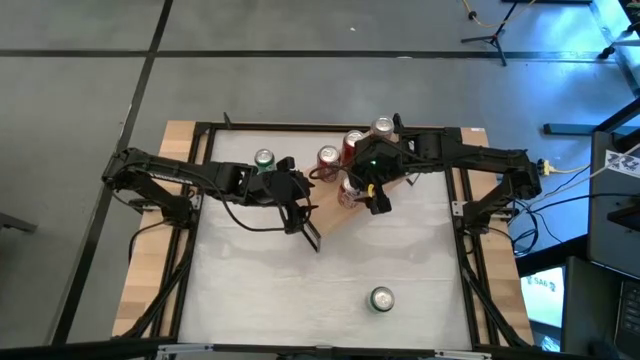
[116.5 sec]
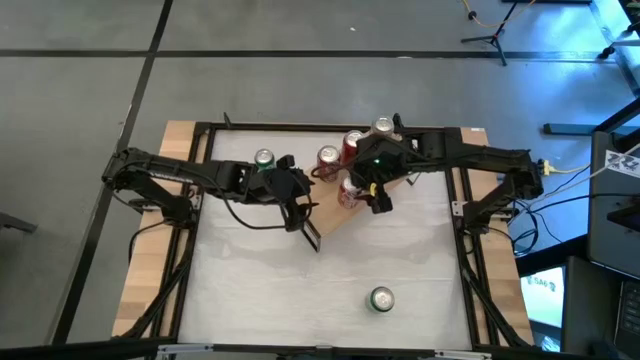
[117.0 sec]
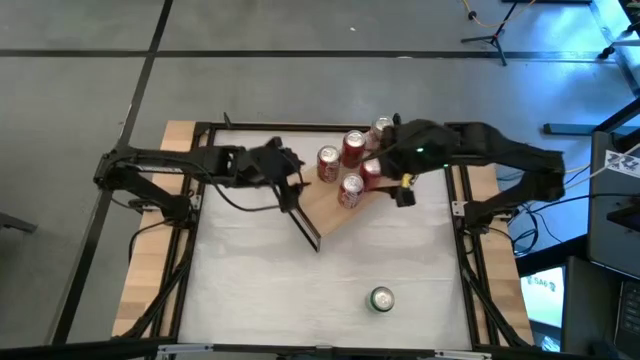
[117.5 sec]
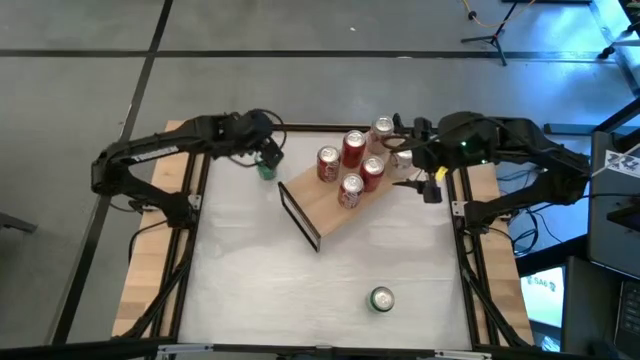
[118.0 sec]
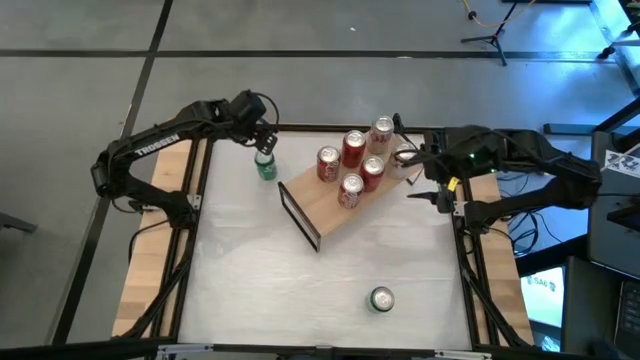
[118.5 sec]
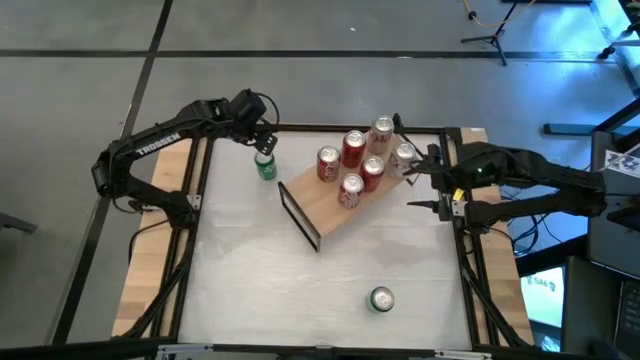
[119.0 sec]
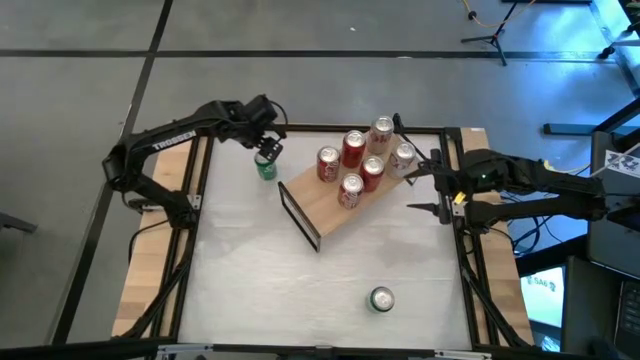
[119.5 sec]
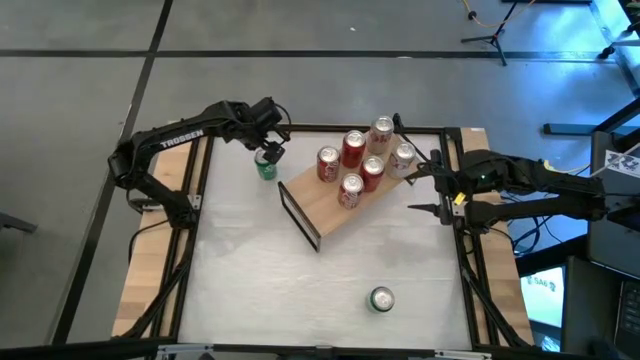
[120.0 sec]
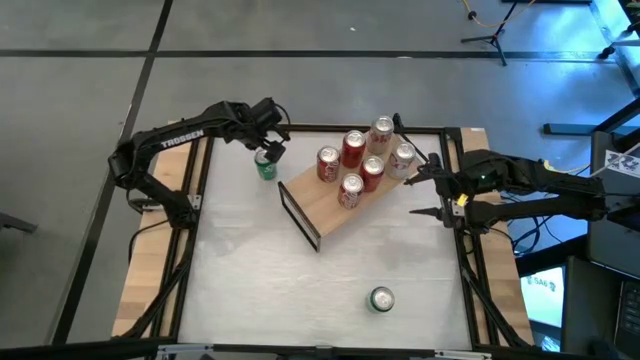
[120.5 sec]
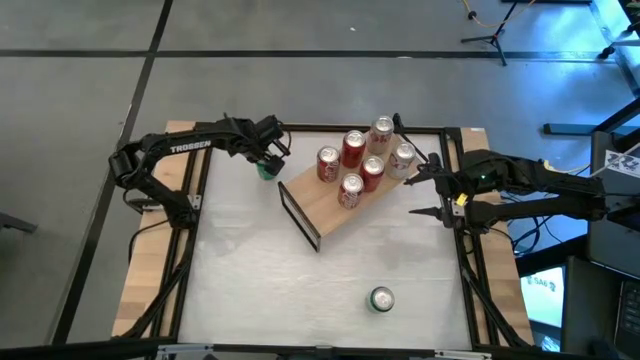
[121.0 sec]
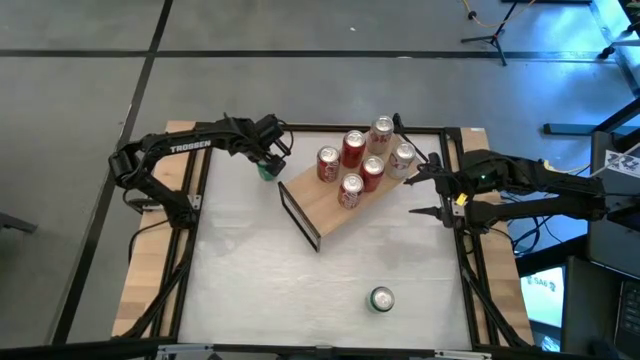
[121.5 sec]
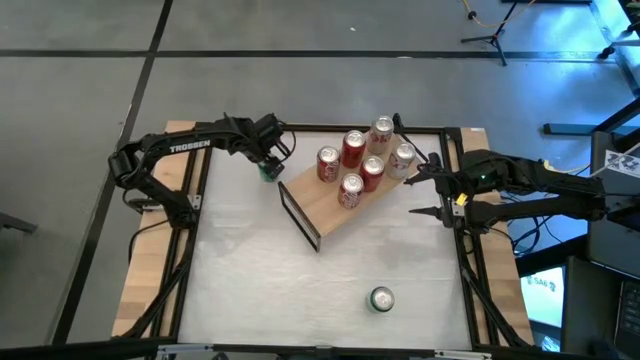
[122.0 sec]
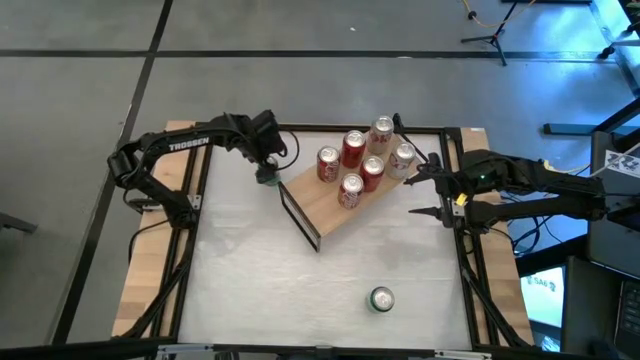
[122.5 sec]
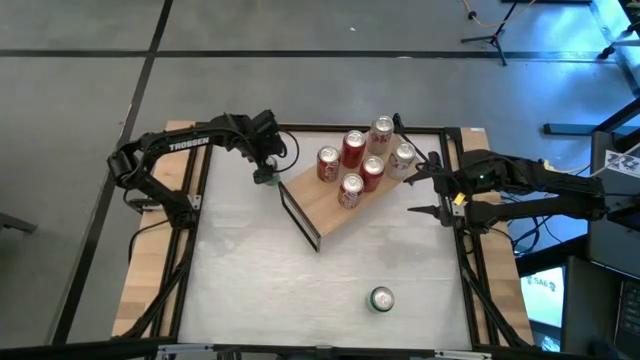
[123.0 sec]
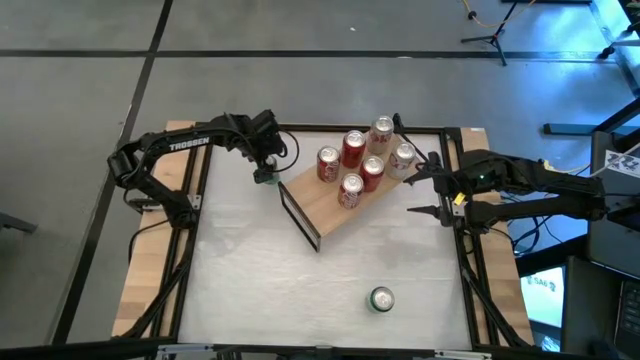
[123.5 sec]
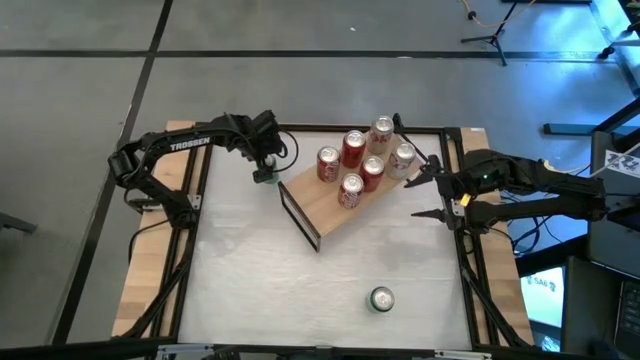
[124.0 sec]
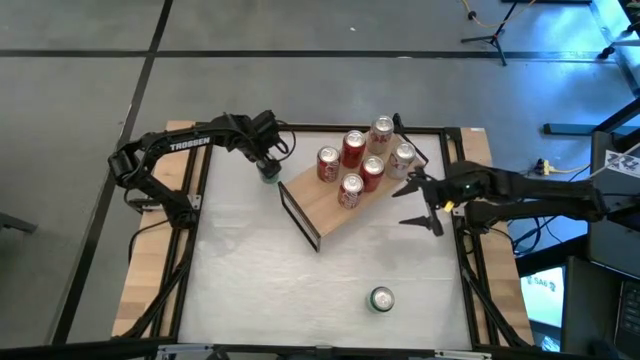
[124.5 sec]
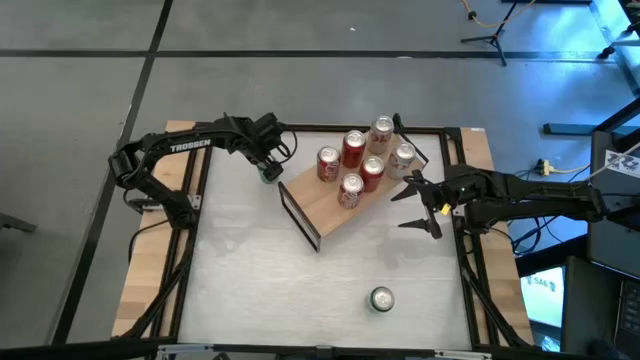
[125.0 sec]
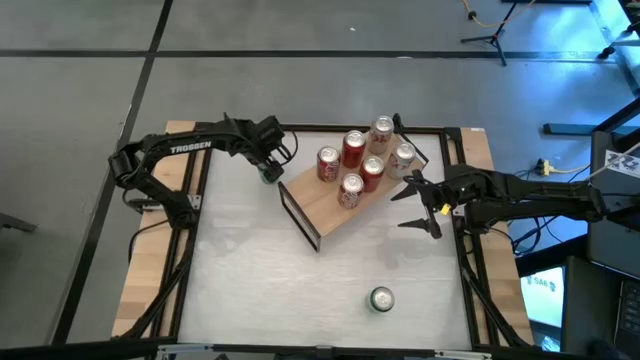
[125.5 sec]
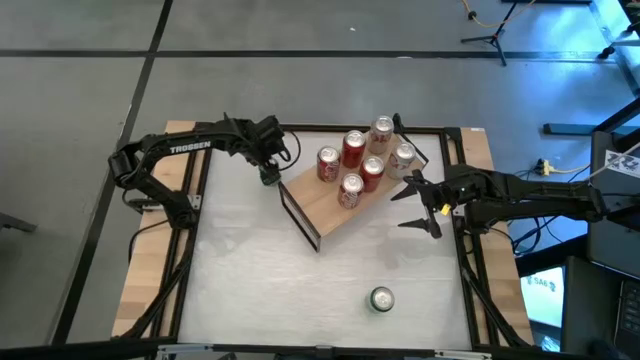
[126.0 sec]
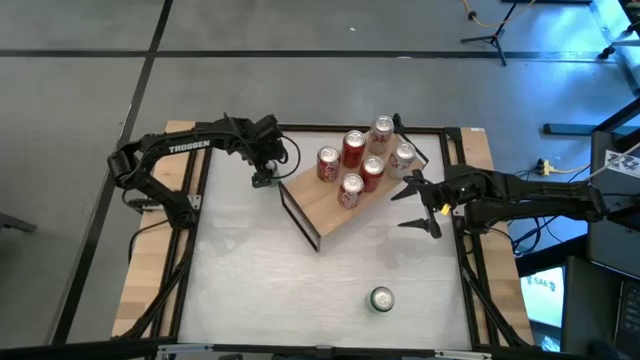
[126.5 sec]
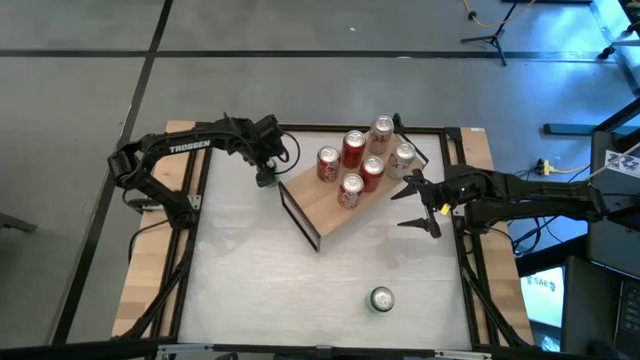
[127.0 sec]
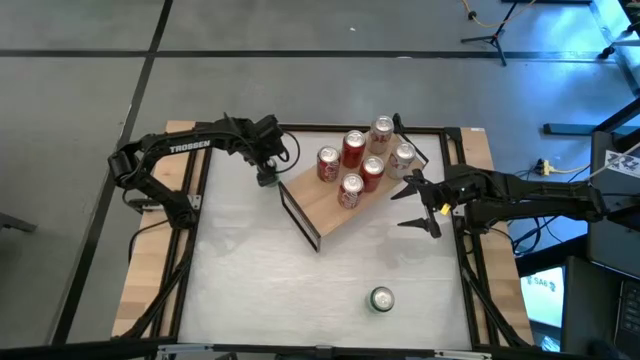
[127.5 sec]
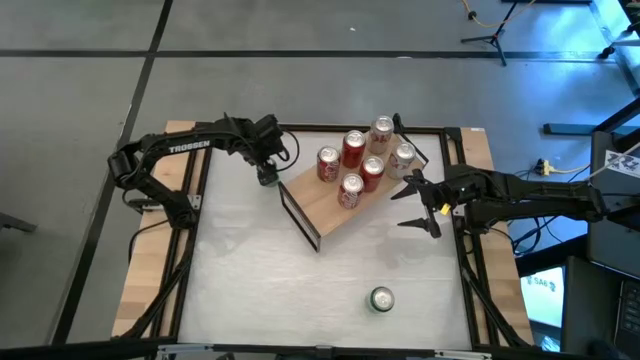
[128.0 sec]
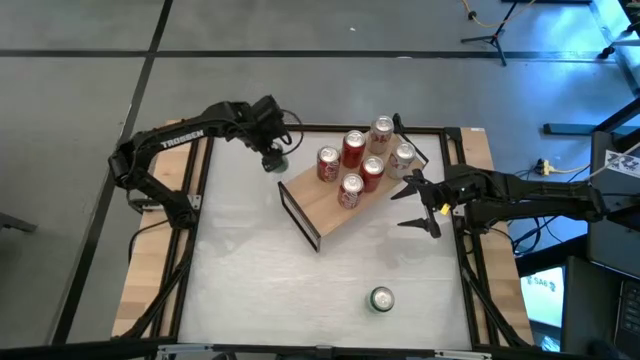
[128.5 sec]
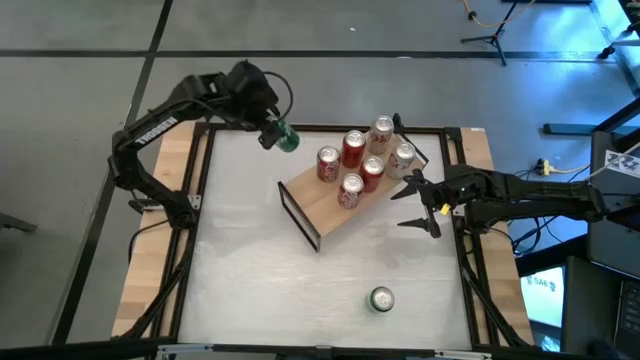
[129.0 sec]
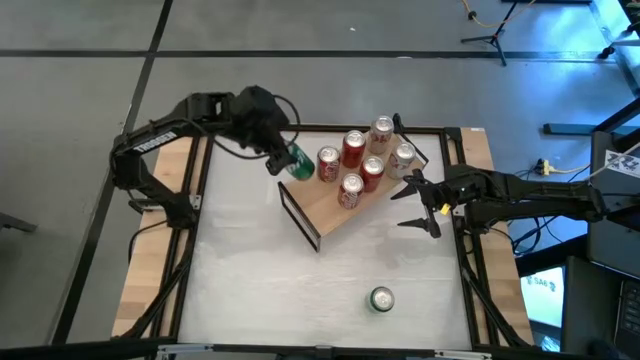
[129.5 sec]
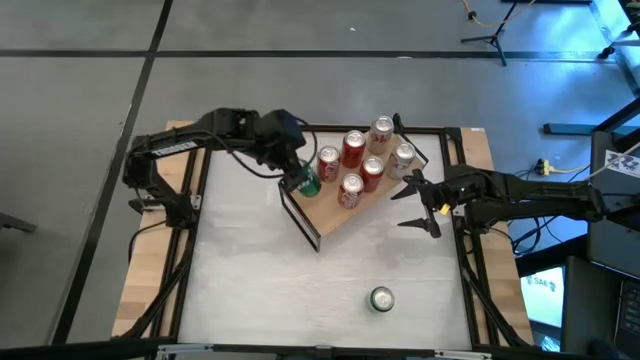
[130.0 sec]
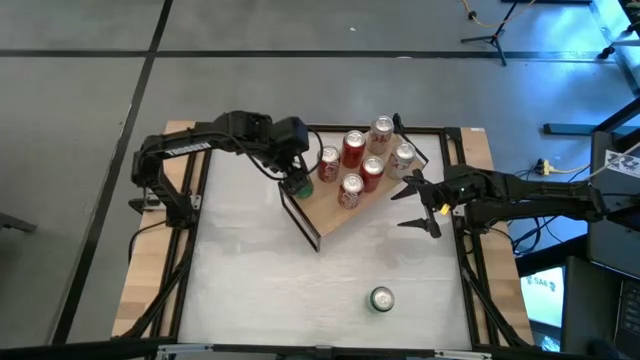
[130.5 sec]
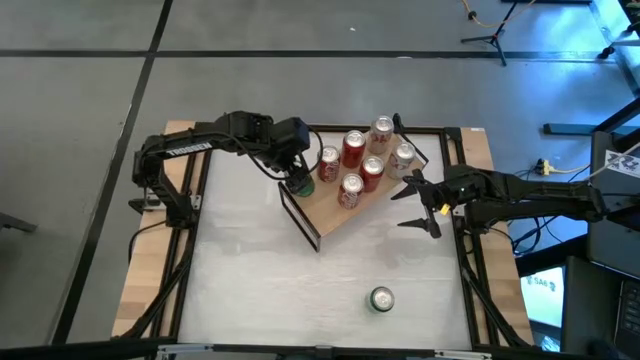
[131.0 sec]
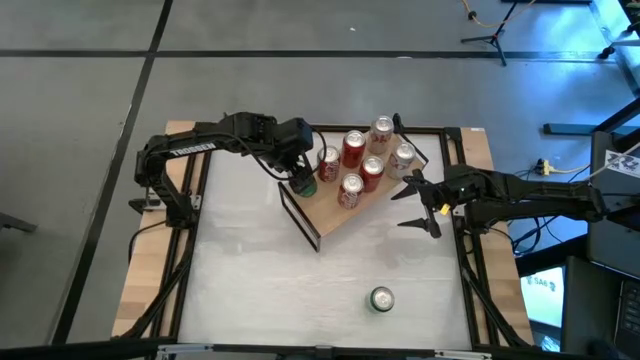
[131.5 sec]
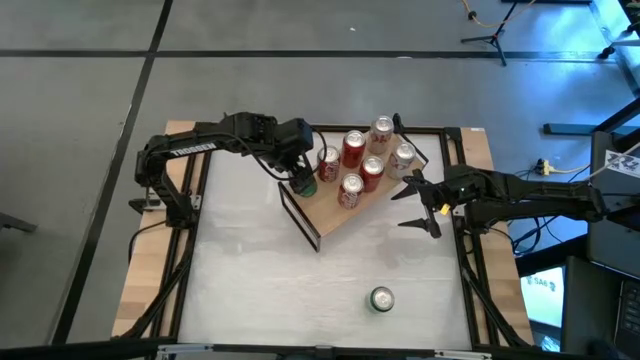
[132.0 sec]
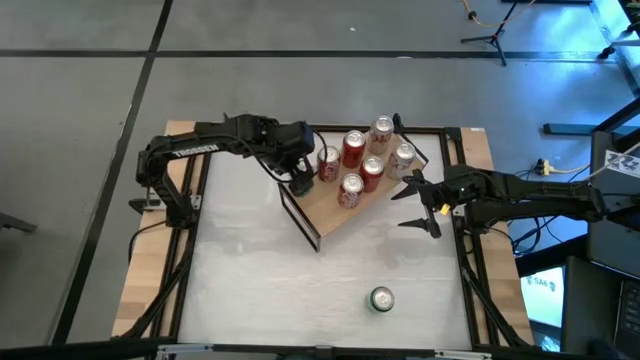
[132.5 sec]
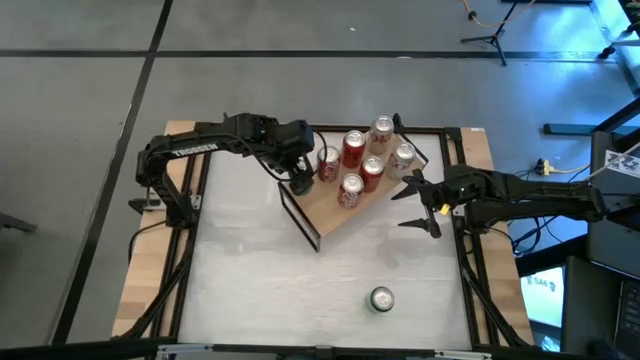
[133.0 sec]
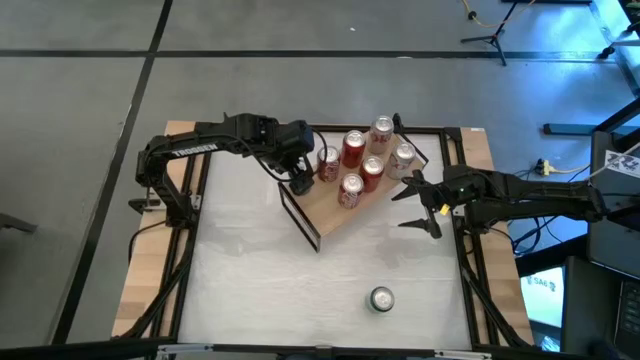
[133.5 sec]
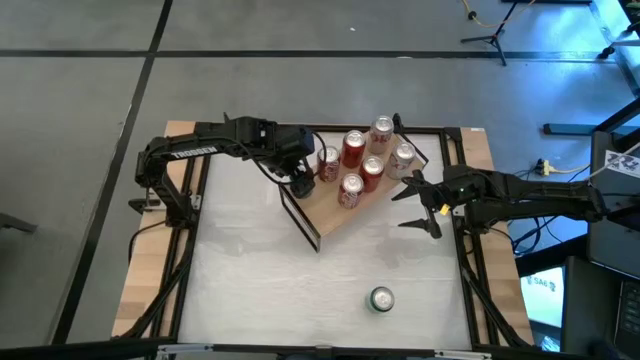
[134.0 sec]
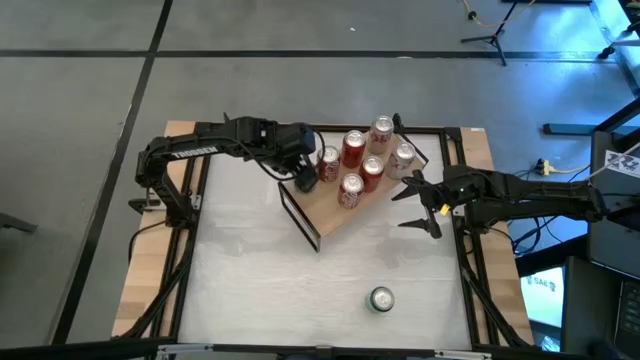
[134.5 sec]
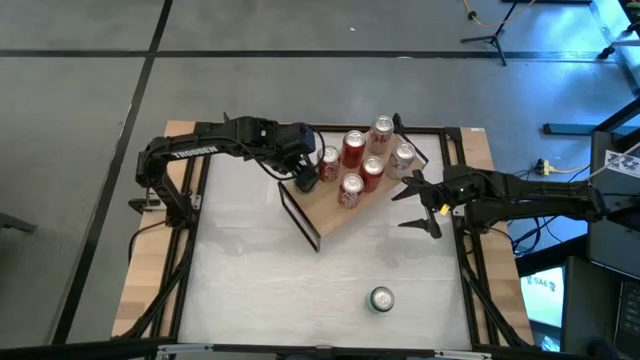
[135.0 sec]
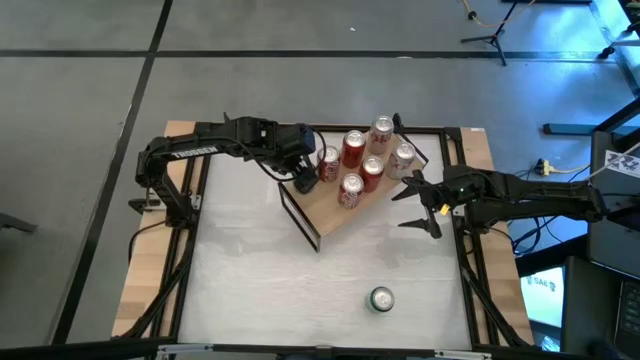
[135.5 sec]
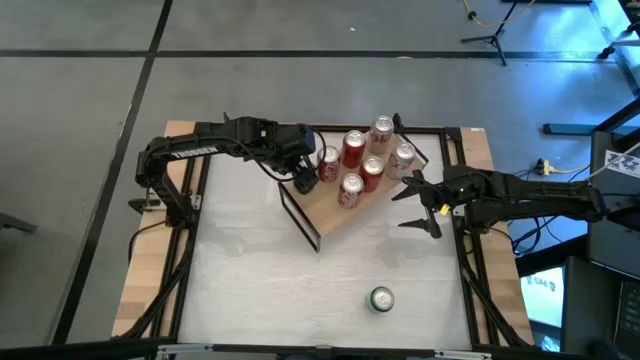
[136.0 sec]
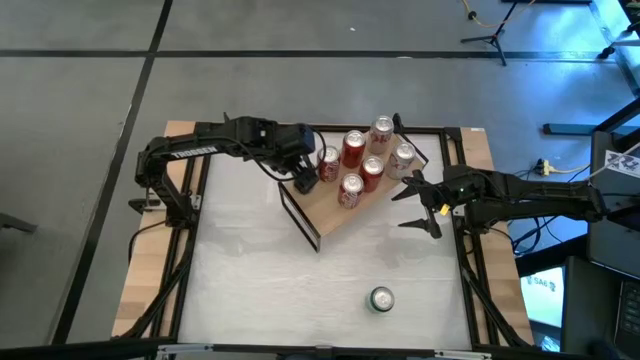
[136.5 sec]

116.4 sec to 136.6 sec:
Task: Place canned beverage on shelf
Put the top green soda can on the shelf
